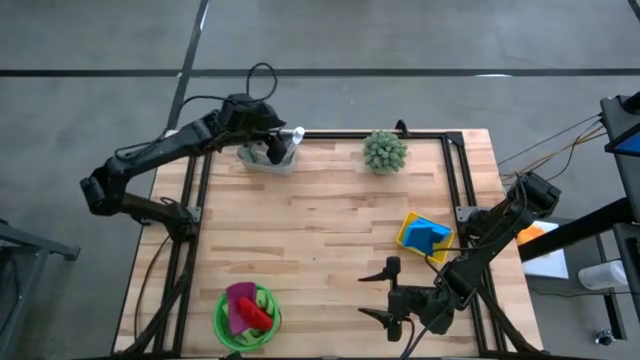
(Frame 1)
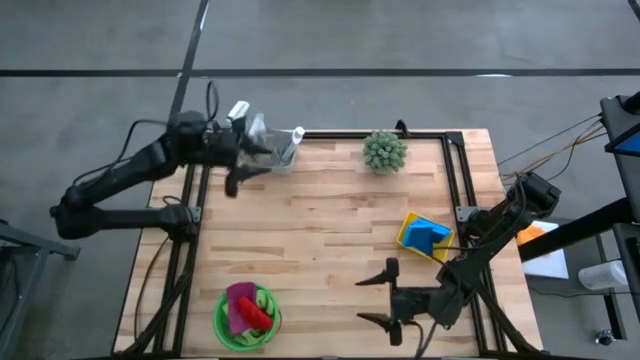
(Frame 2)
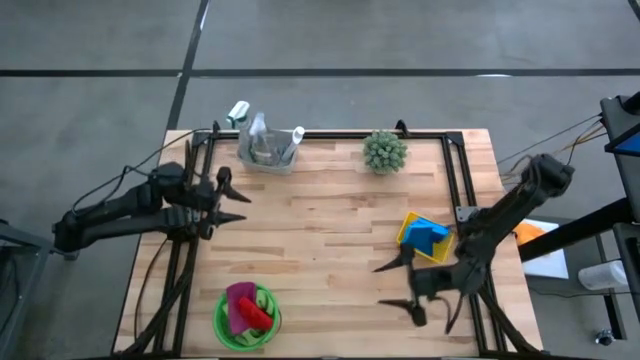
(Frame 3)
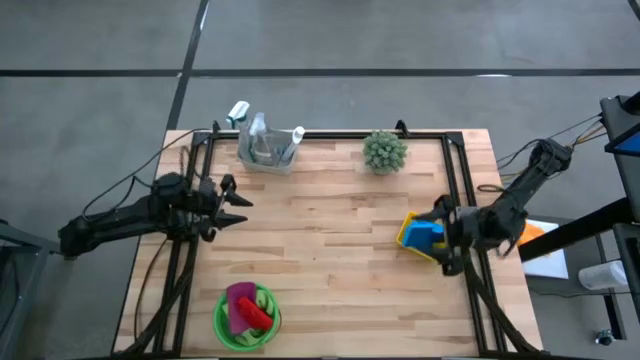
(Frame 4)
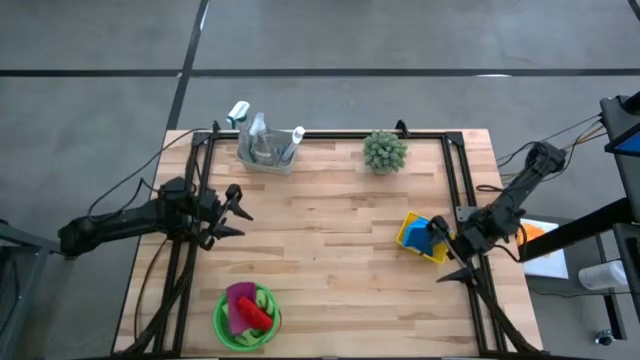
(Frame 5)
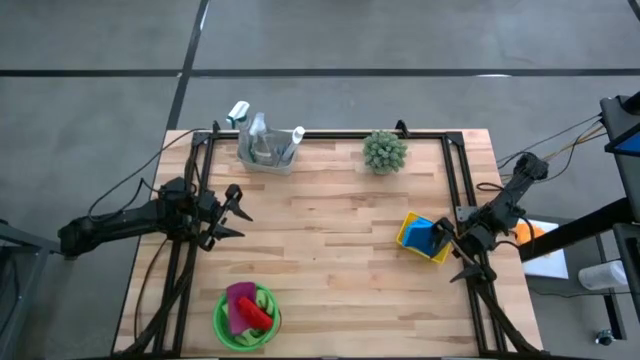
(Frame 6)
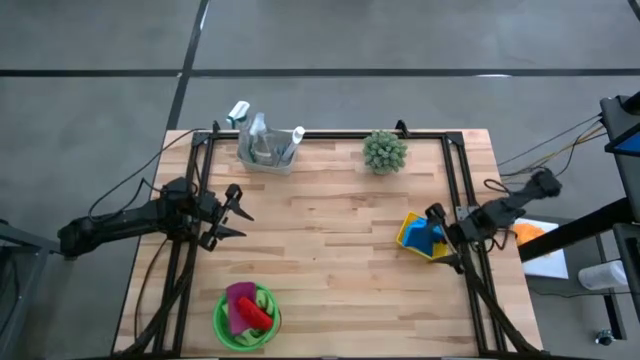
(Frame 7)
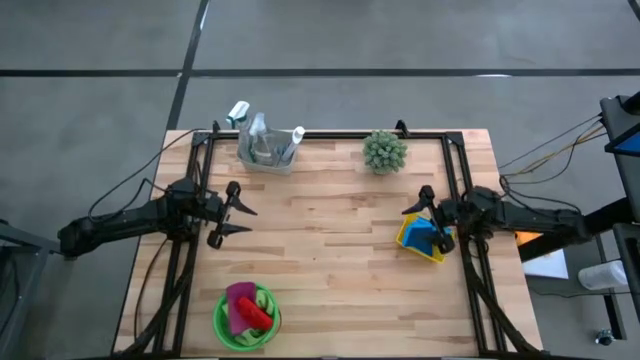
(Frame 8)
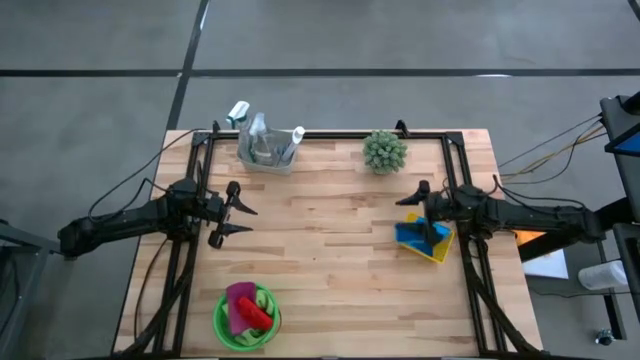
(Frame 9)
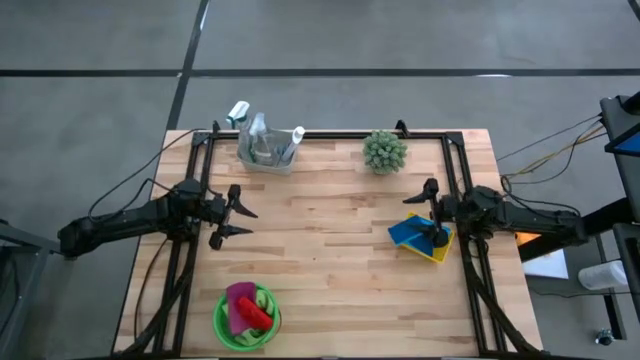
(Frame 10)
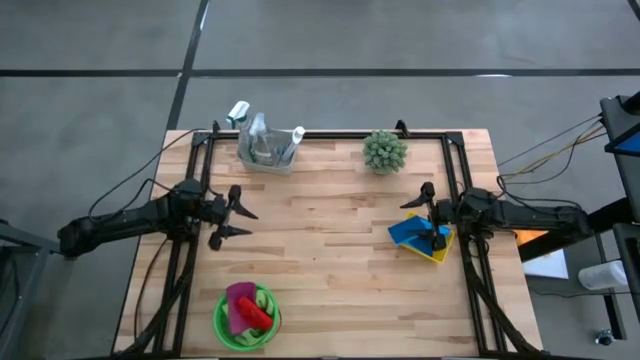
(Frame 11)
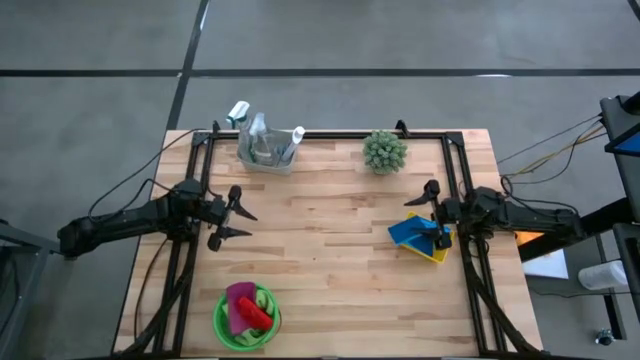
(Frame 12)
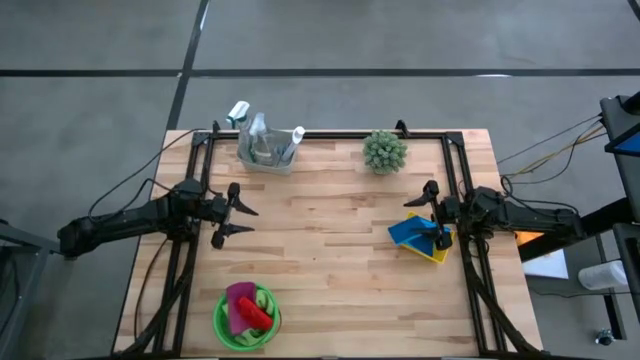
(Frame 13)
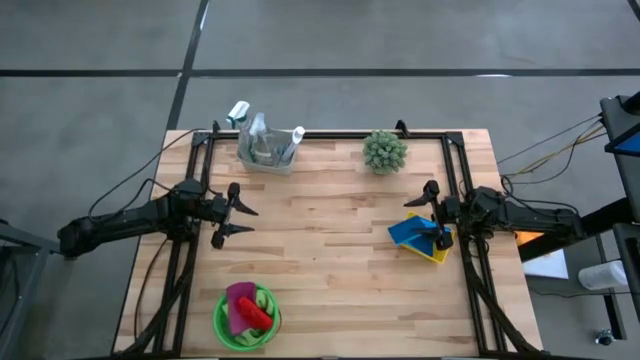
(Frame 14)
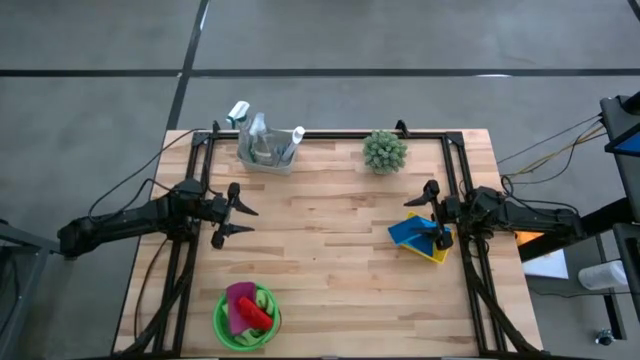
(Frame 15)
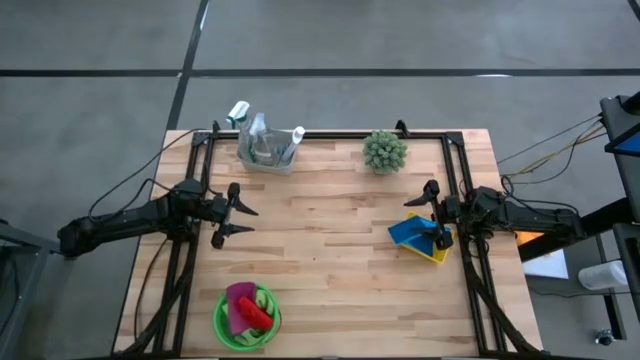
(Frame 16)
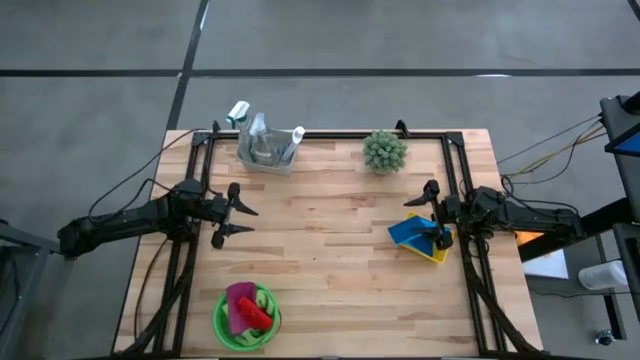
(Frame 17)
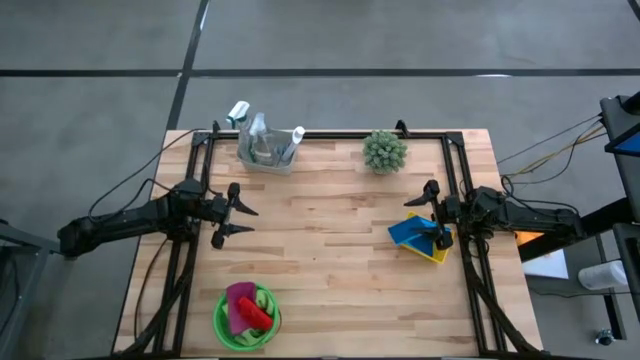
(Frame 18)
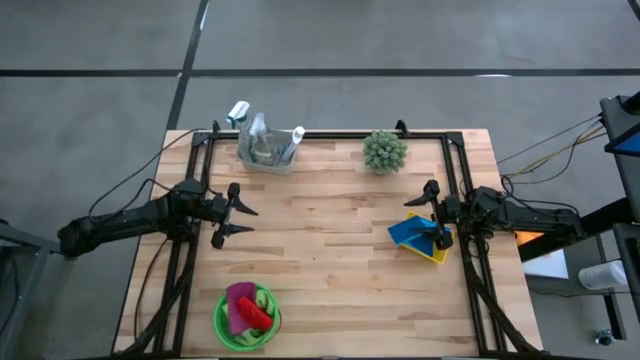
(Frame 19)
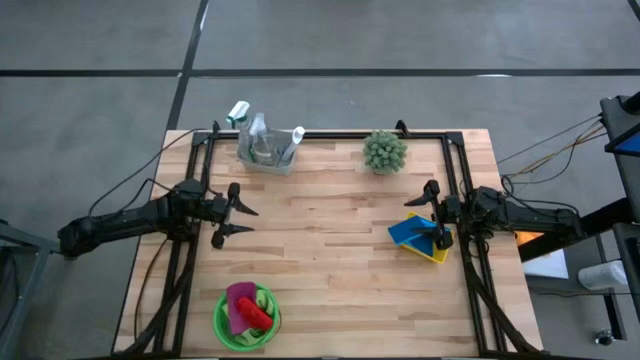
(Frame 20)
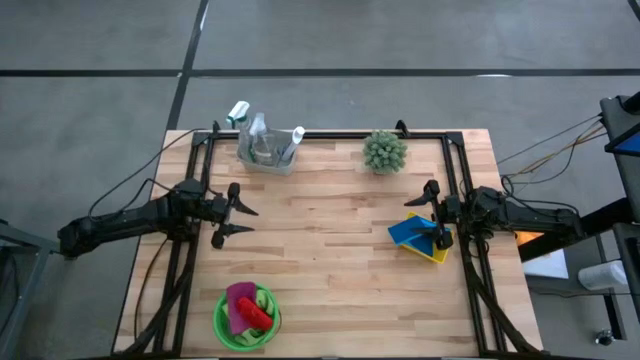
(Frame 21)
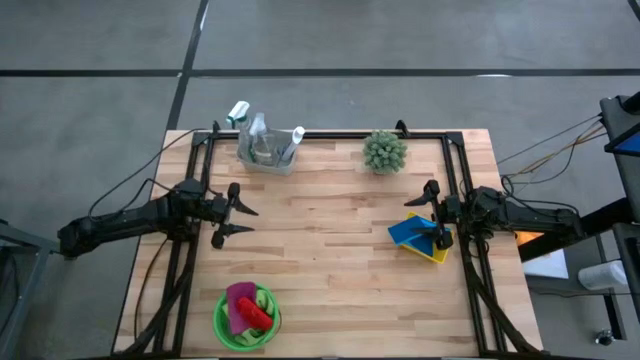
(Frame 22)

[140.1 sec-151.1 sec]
Task: Pick & Place Kitchen Items
Return to Home Position
